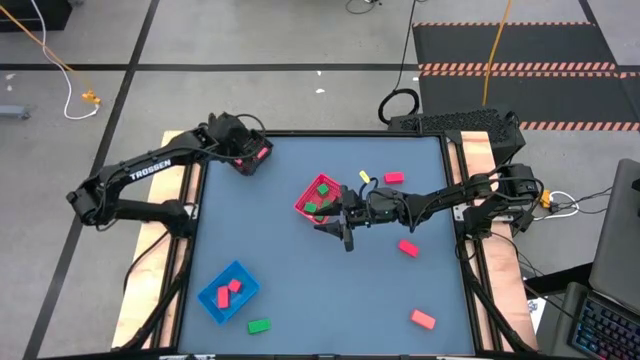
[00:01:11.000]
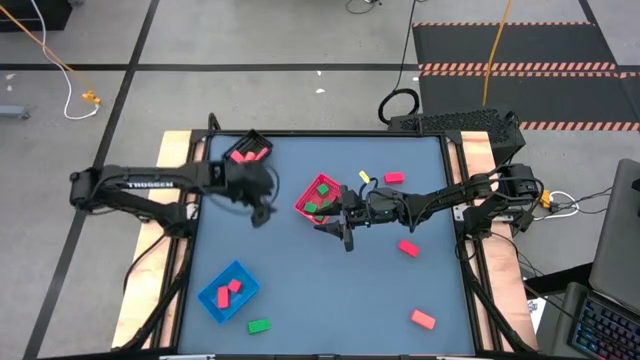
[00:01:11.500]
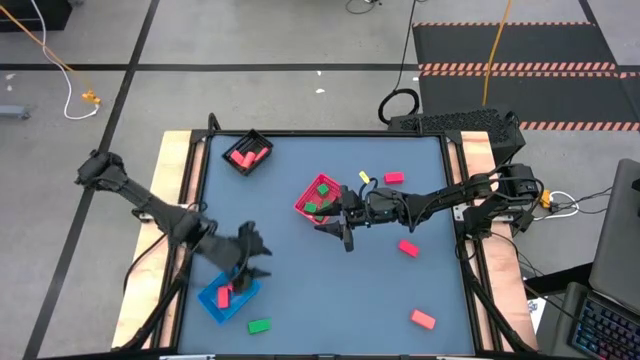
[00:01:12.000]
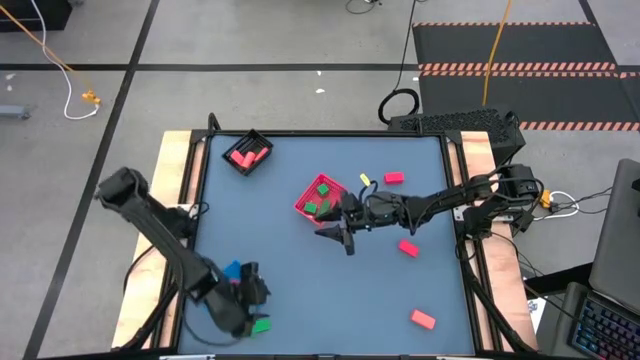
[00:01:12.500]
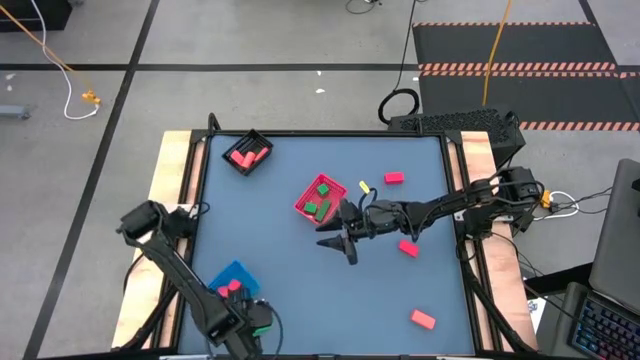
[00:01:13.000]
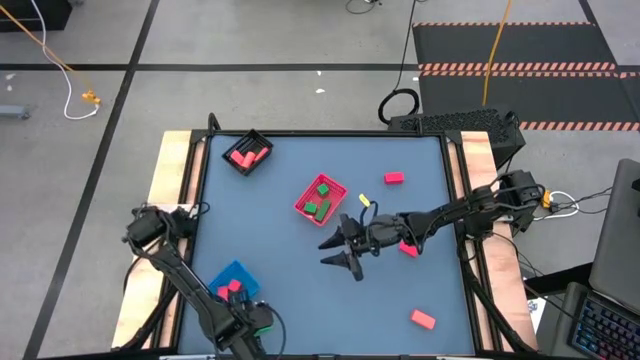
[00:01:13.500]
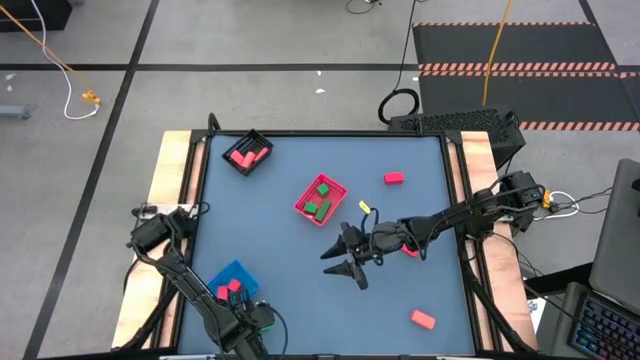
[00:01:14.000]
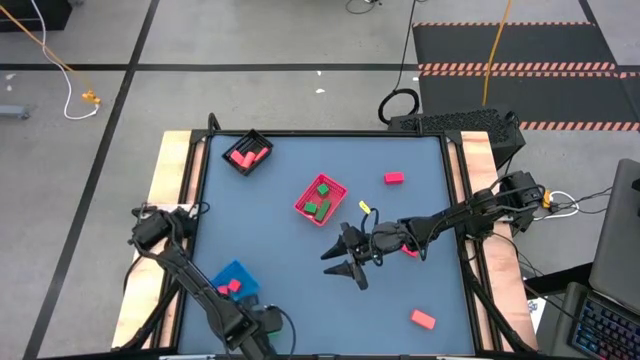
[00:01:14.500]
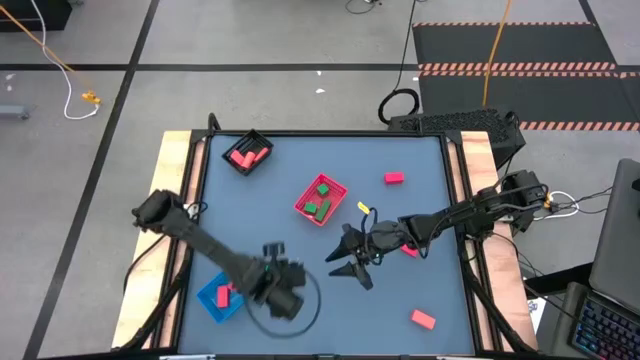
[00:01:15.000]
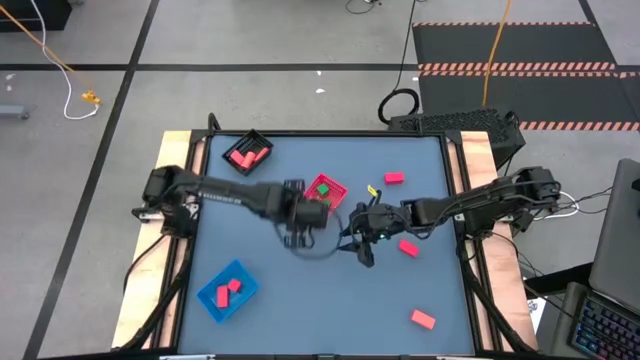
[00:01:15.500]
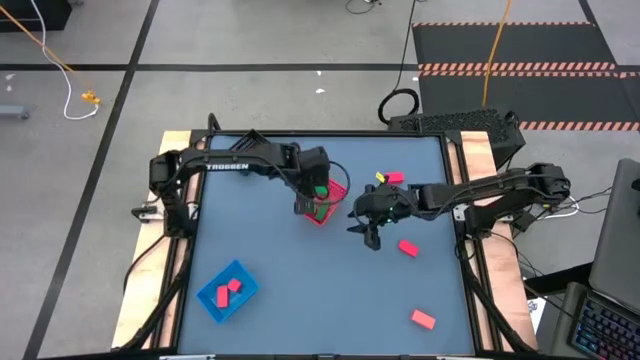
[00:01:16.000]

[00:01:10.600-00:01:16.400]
Task: Sort & place blocks by color
Put the green block into the orange bin

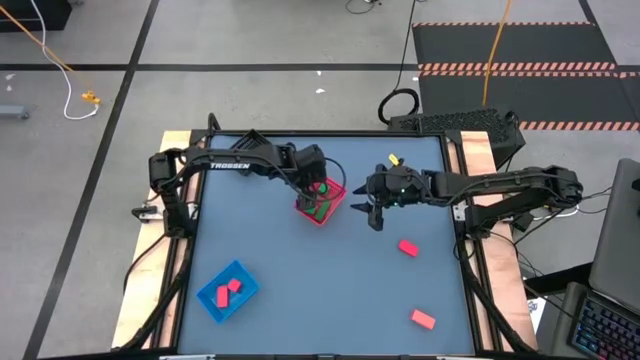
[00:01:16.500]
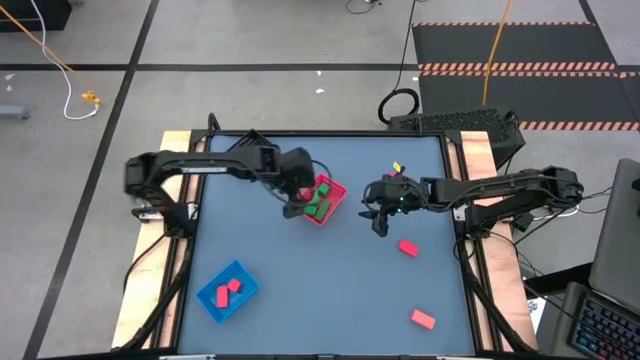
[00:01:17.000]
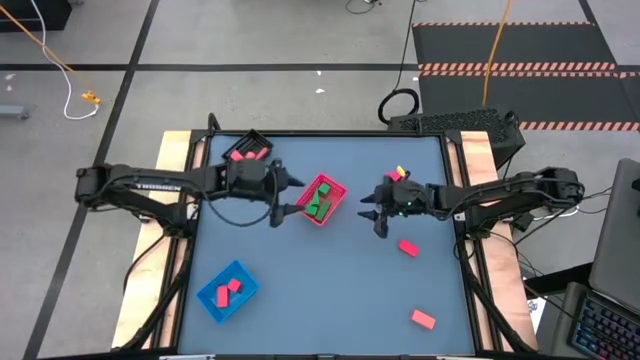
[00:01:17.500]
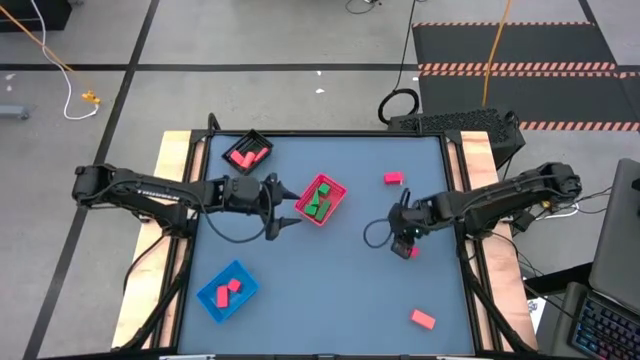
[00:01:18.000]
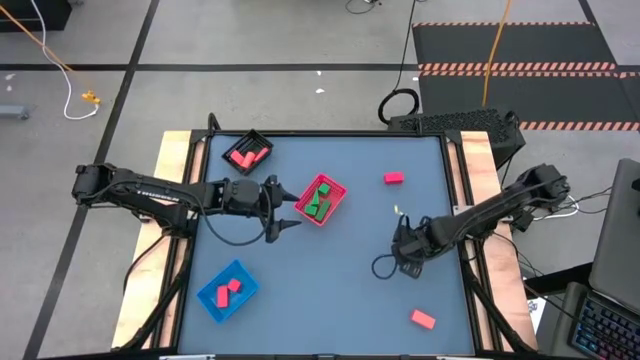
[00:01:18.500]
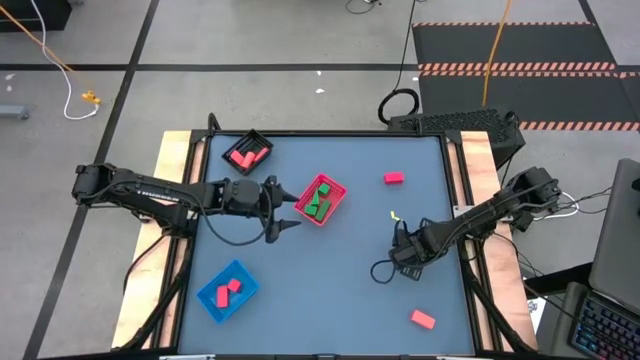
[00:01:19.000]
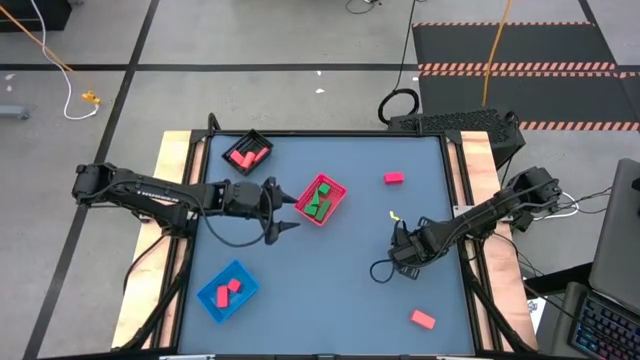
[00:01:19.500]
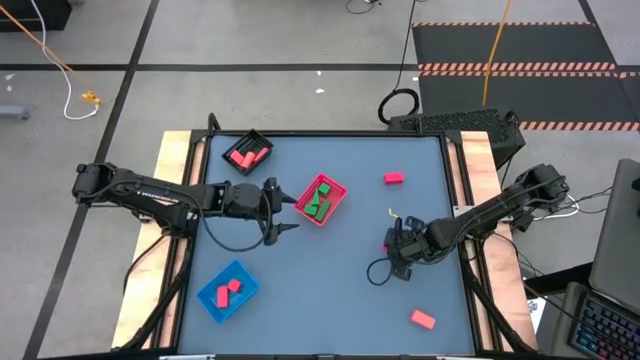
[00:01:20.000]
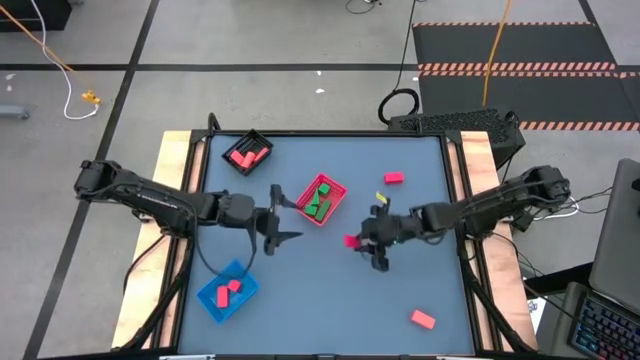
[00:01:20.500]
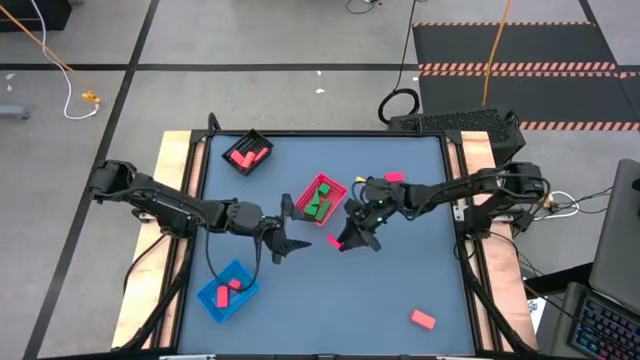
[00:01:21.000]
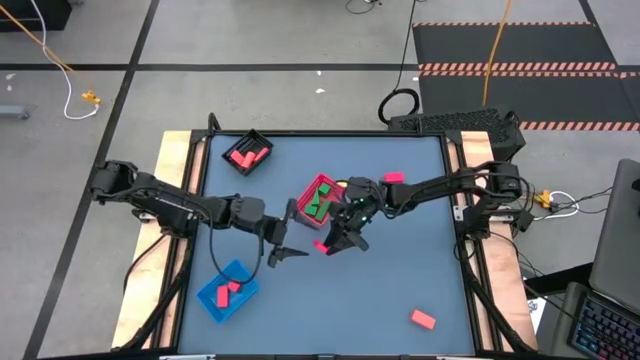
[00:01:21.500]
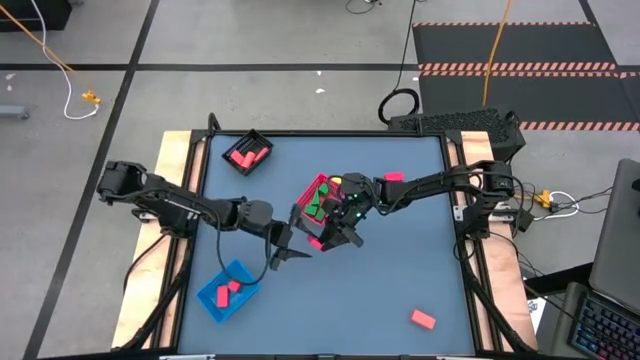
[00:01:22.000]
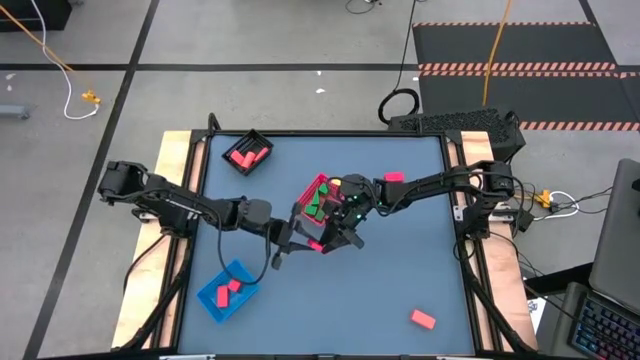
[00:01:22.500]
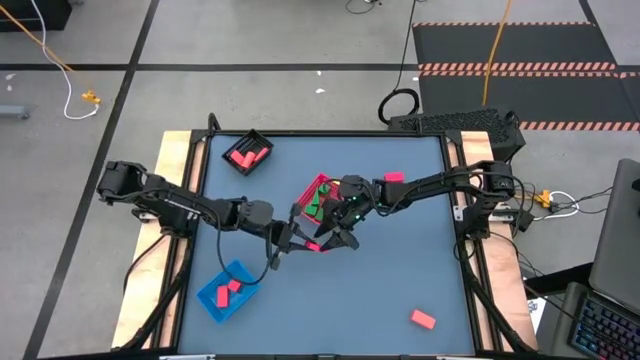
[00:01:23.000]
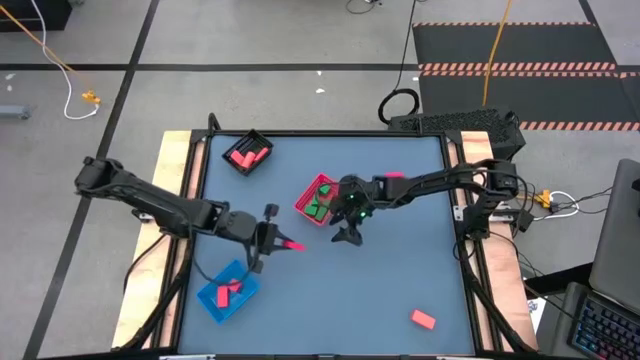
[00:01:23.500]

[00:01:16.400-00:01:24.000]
Put the red block into the blue bin

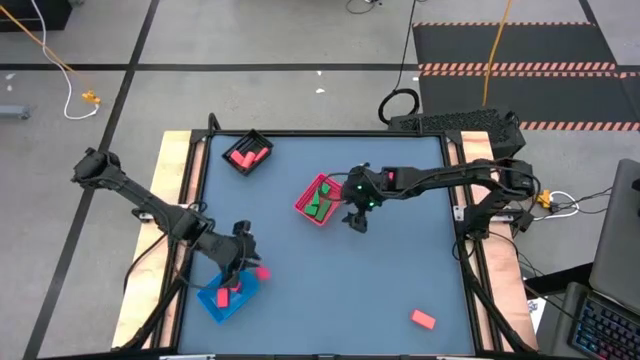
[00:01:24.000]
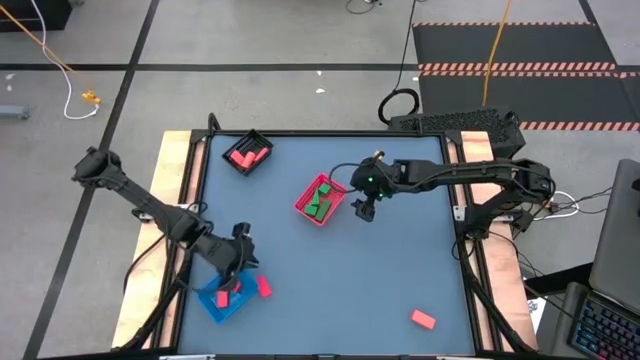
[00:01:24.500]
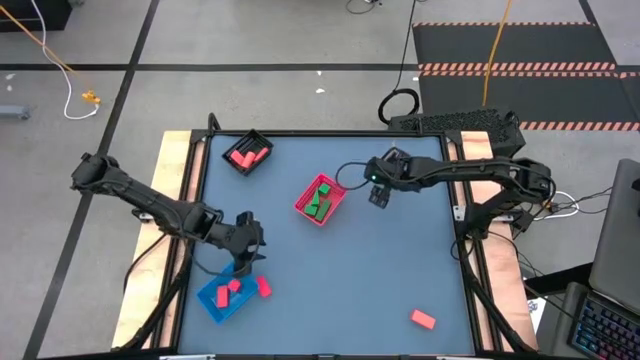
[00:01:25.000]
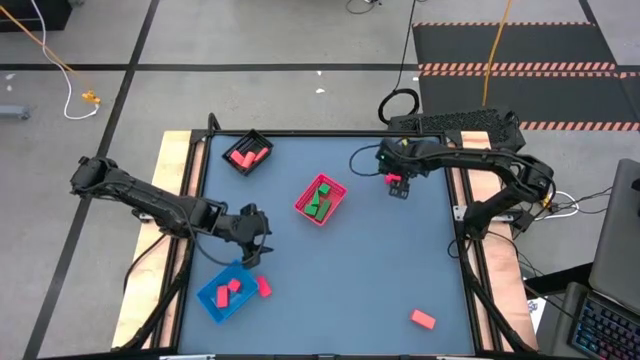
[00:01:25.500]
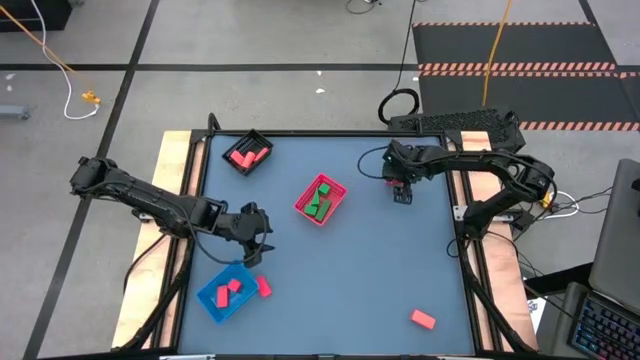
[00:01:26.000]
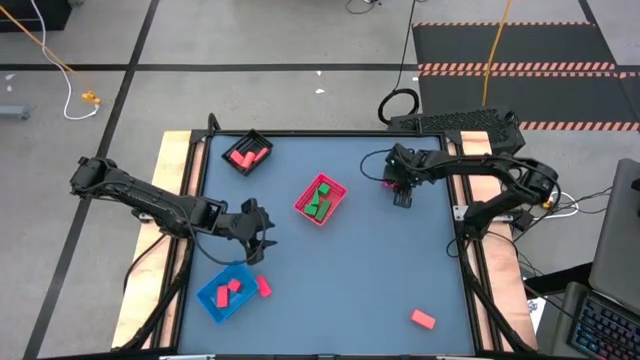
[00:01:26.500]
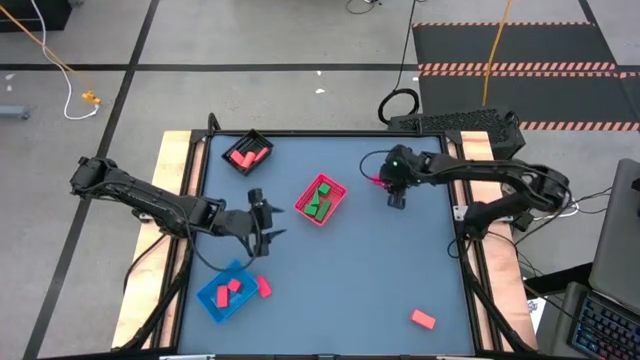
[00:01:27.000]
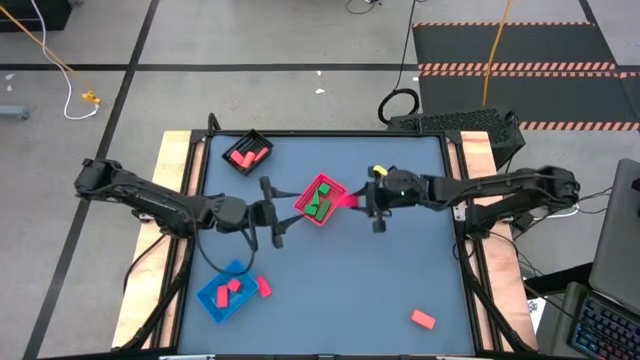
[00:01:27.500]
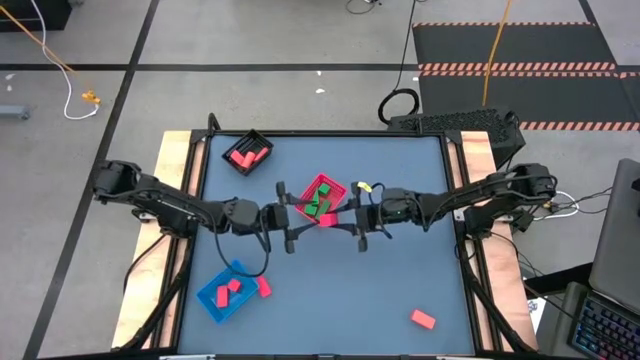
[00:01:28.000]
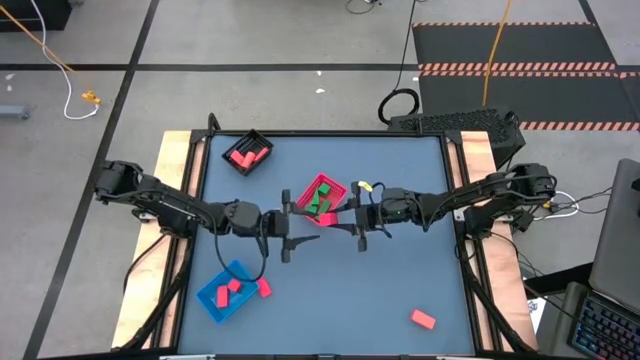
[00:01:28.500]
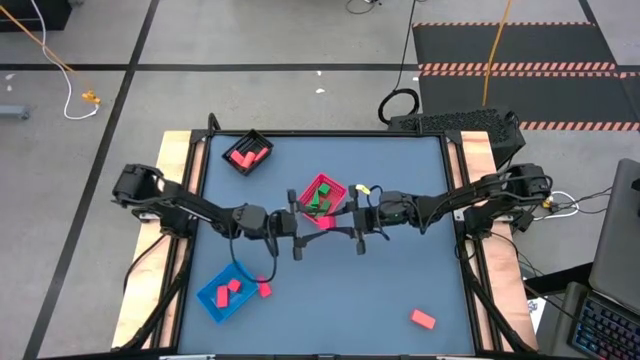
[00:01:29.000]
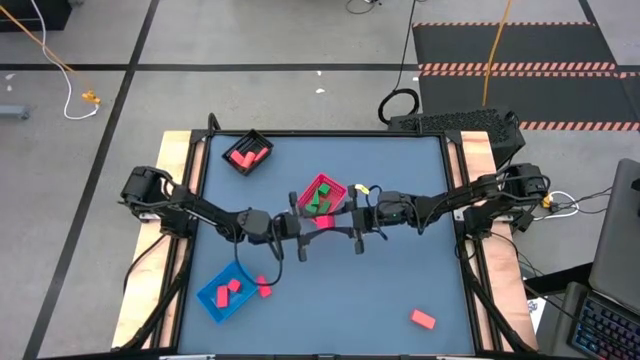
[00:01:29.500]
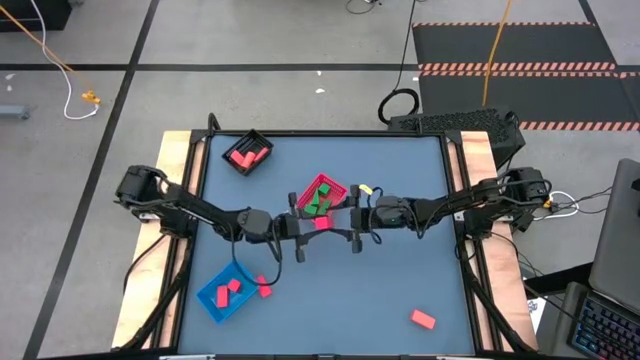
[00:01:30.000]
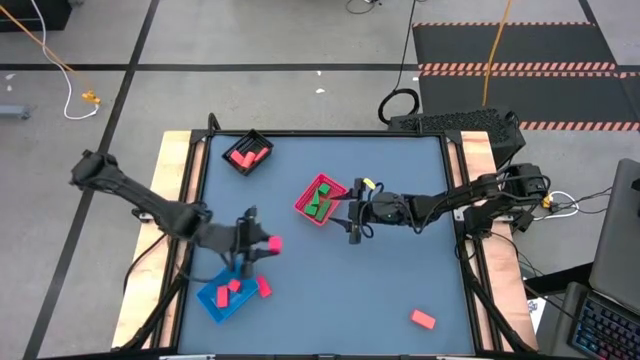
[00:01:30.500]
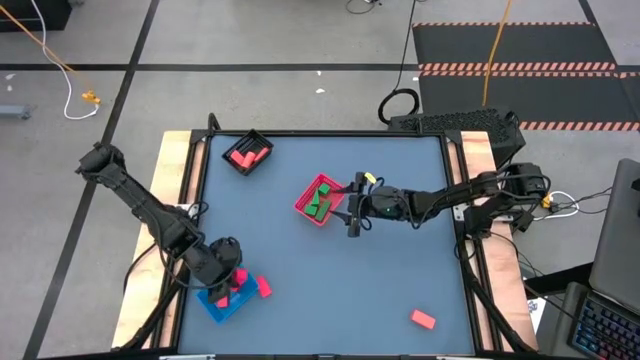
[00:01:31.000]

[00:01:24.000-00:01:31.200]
Put the red block into the blue bin

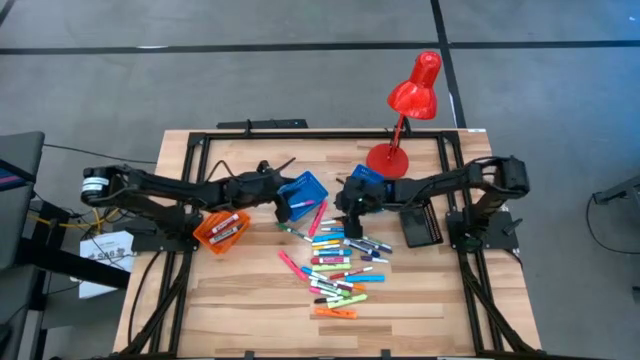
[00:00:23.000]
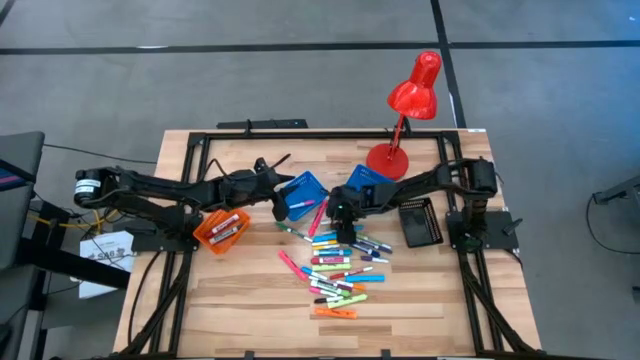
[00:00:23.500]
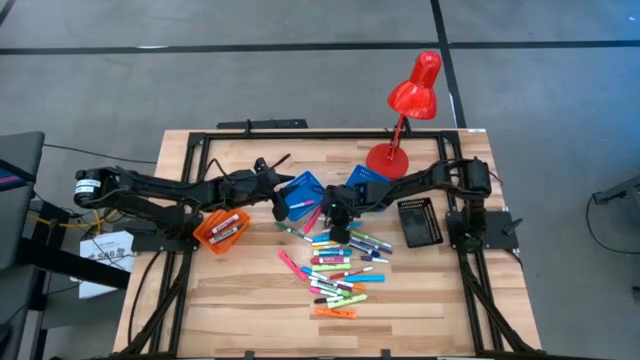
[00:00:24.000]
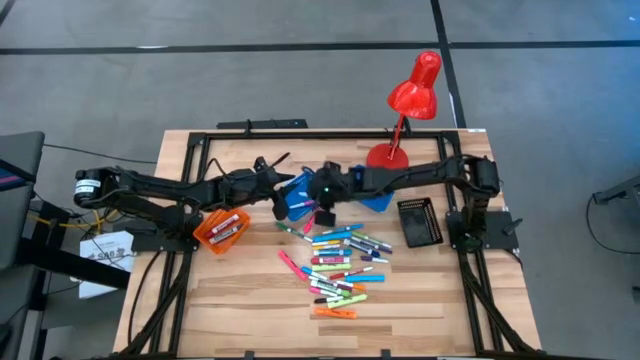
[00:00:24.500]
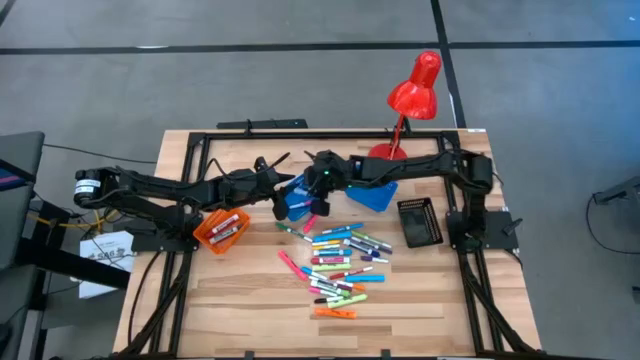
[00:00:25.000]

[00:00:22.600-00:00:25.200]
Task: Pick & Place Markers
Put the top small orange highlighter pen into the left blue bin
